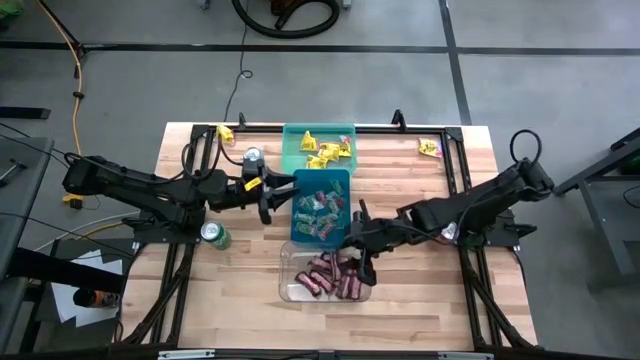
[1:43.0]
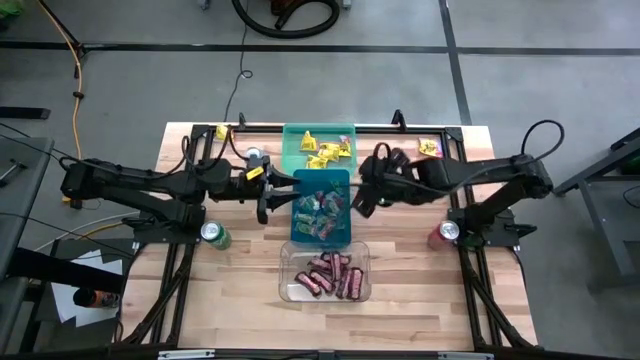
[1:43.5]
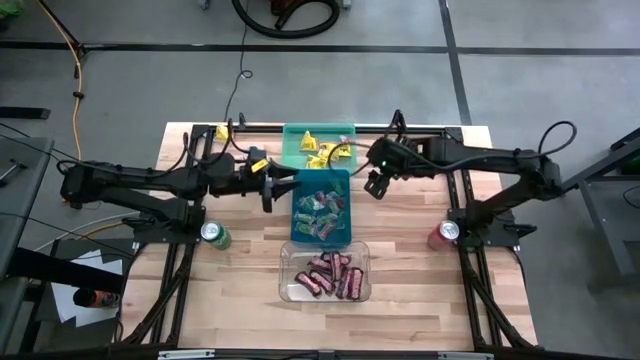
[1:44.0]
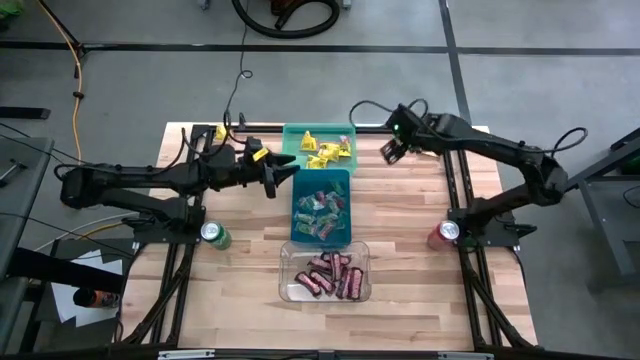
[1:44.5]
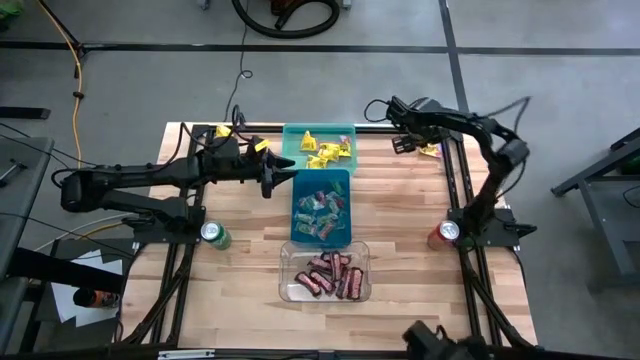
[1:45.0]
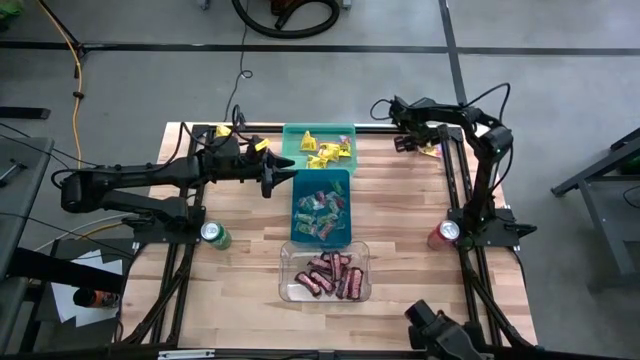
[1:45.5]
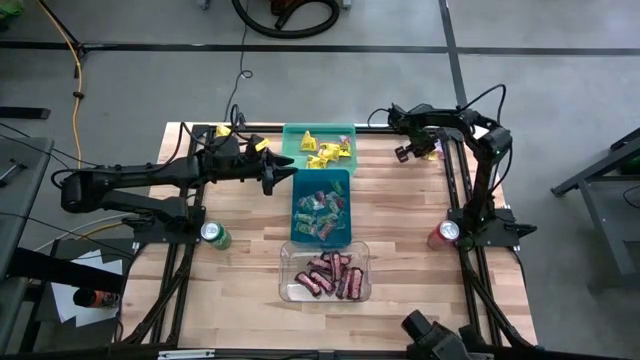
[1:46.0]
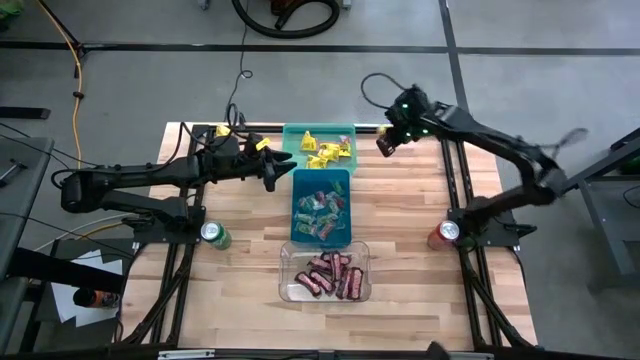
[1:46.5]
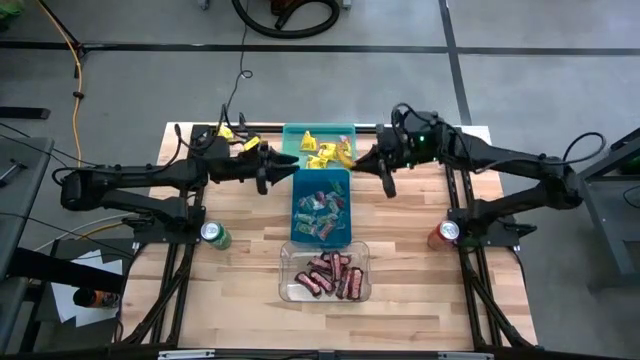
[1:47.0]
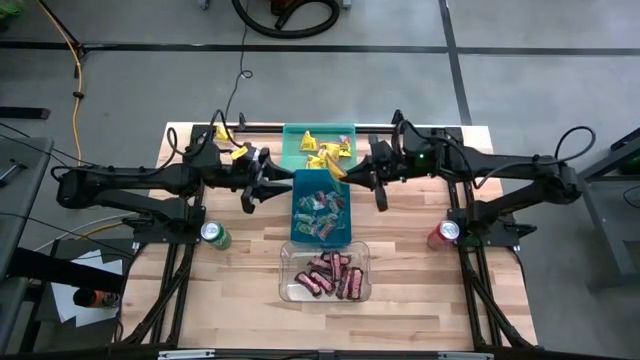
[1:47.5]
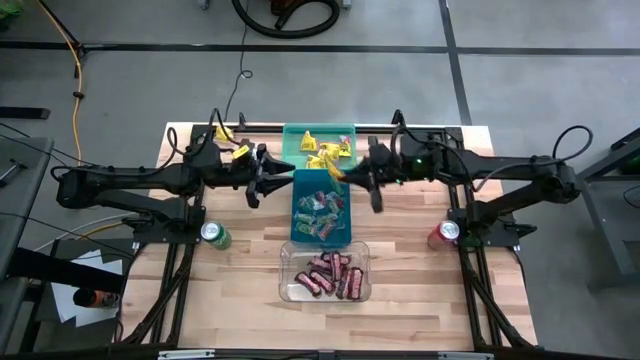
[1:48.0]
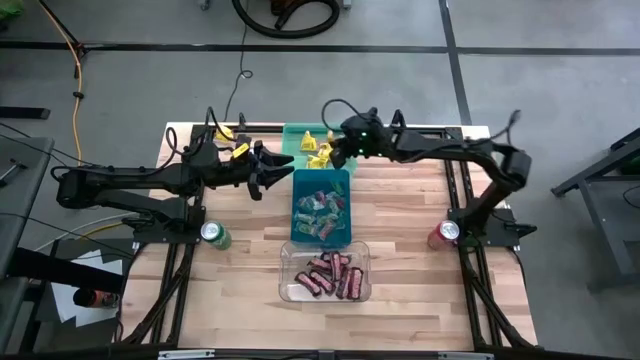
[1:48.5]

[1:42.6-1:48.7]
Task: Sort candy
Put the yellow candy into the light blue bin

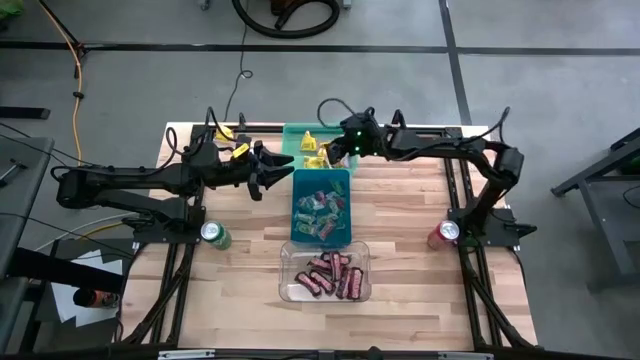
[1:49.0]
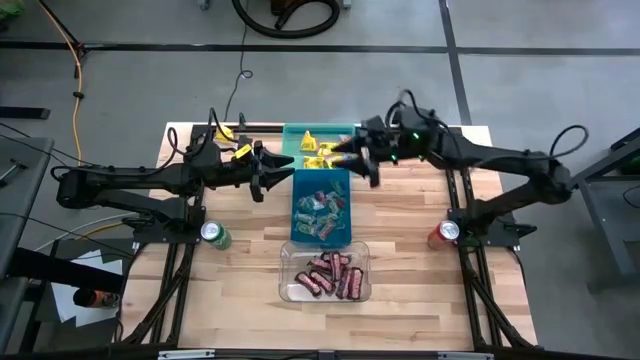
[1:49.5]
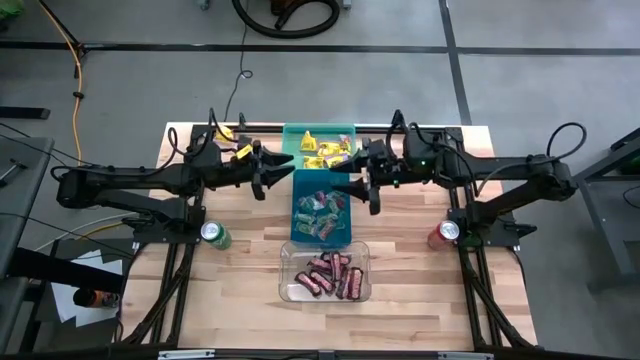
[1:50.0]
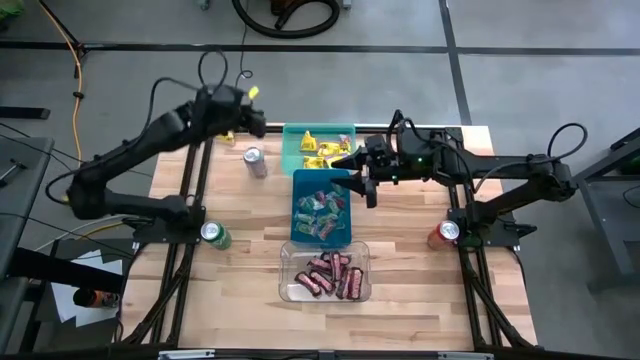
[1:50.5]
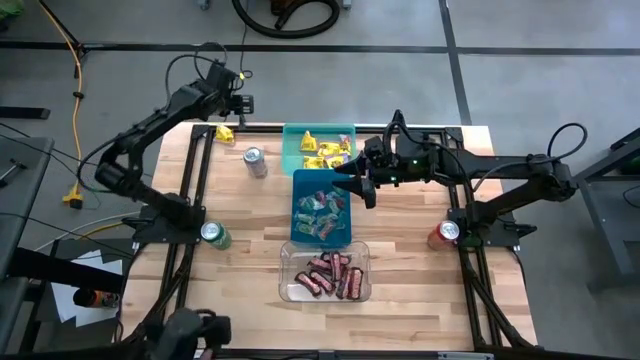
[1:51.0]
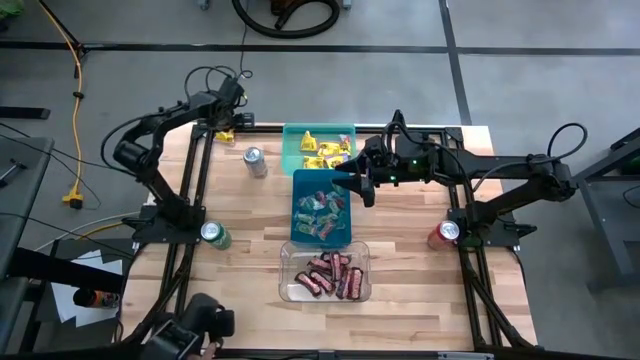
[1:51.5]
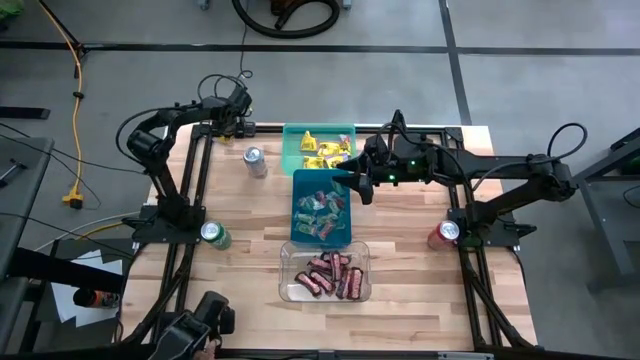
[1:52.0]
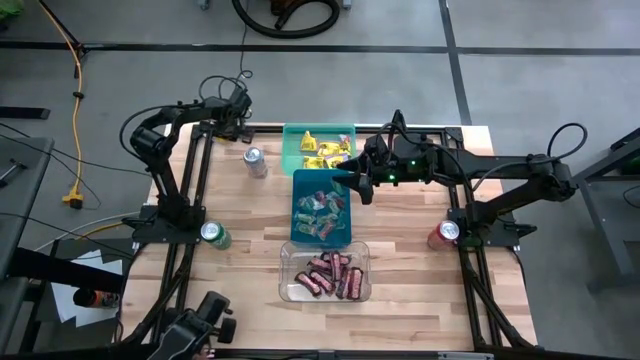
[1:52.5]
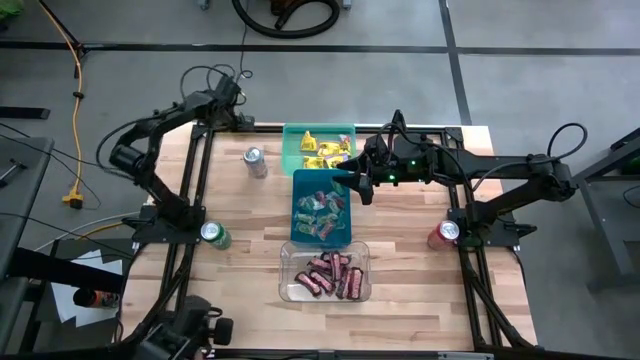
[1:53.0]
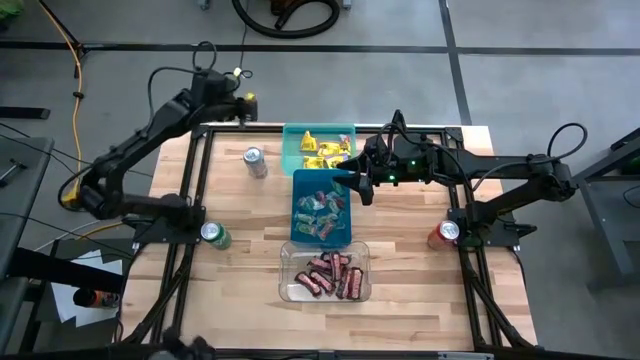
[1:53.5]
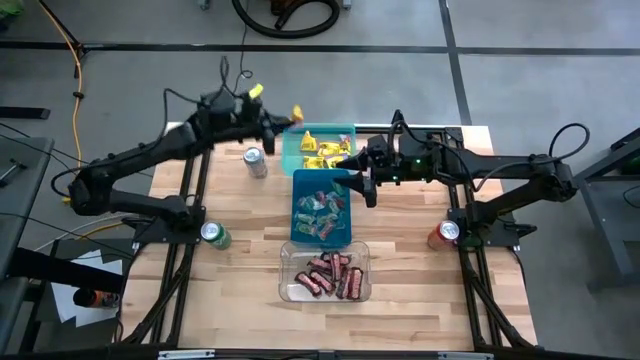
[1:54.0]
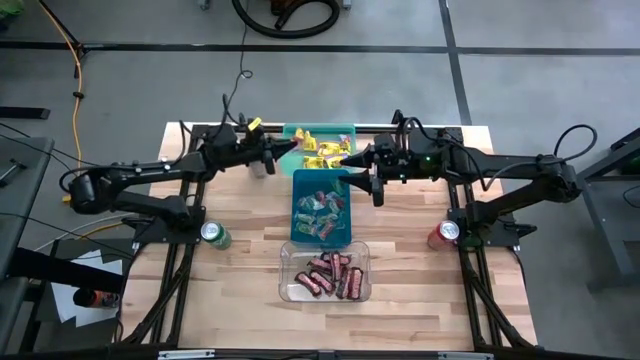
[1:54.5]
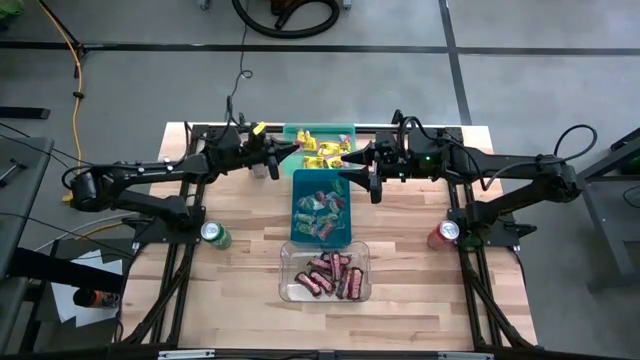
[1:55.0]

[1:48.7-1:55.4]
Put the yellow candy into the light blue bin

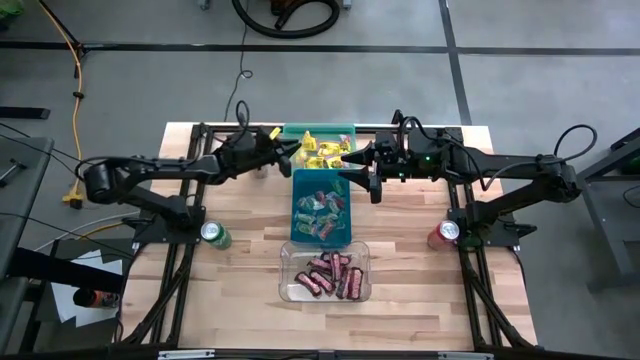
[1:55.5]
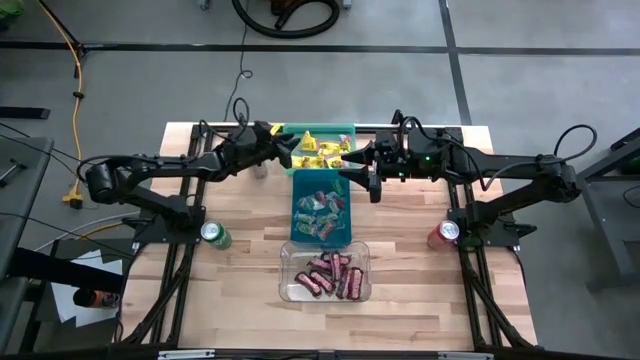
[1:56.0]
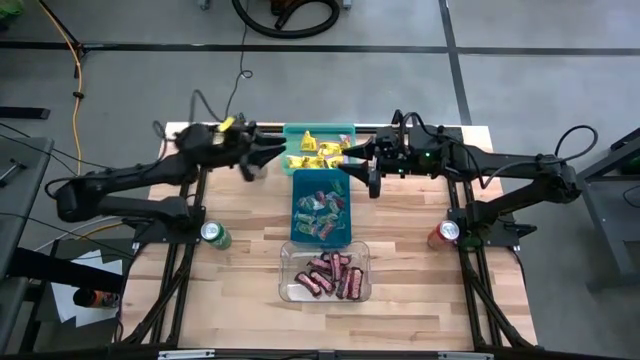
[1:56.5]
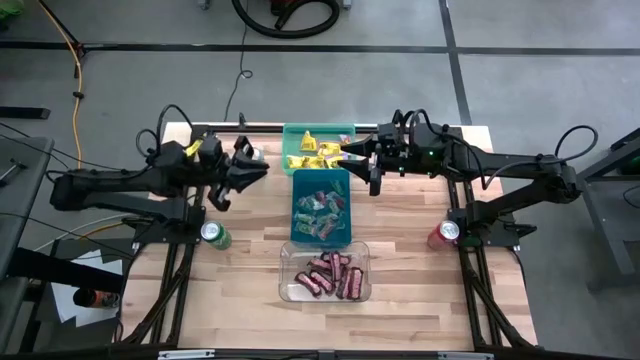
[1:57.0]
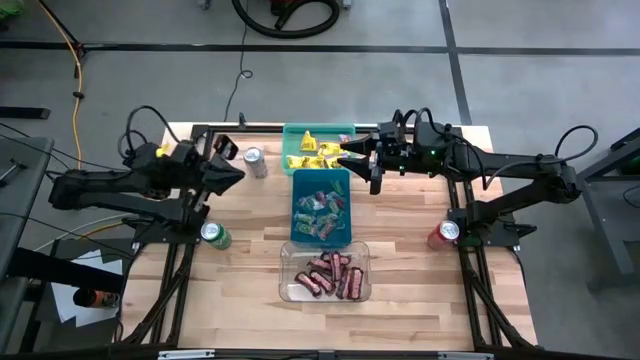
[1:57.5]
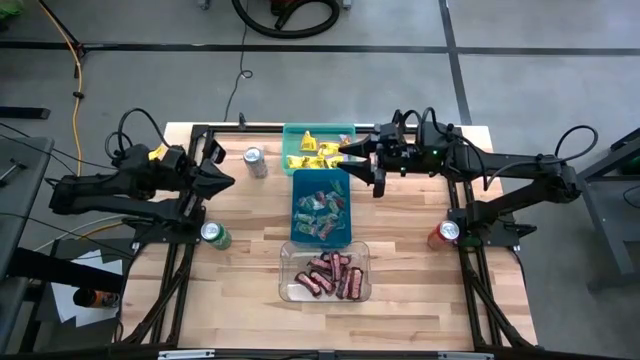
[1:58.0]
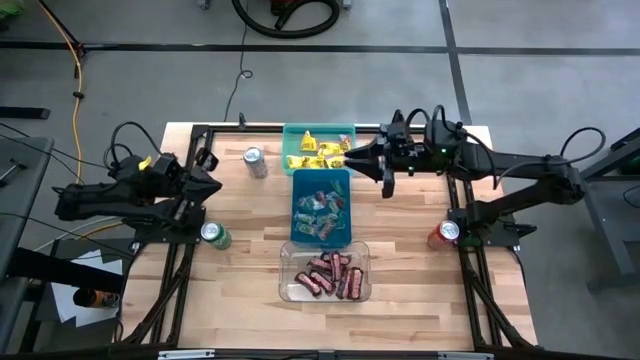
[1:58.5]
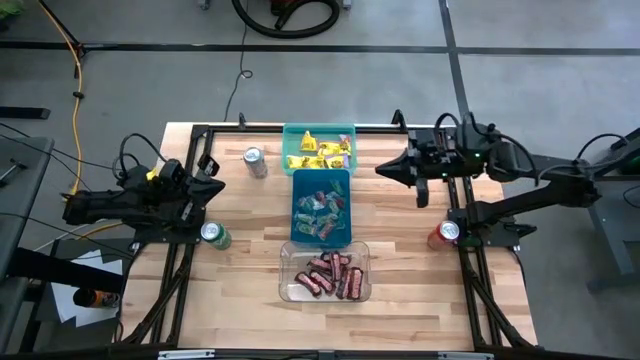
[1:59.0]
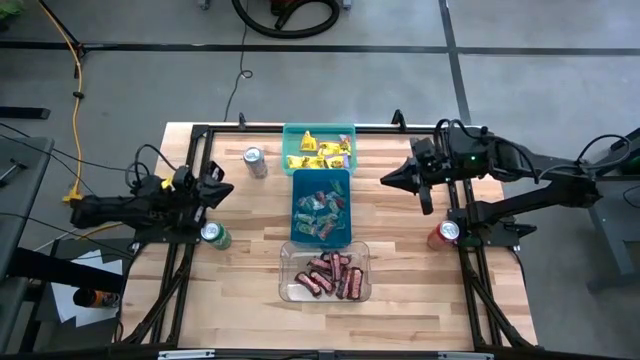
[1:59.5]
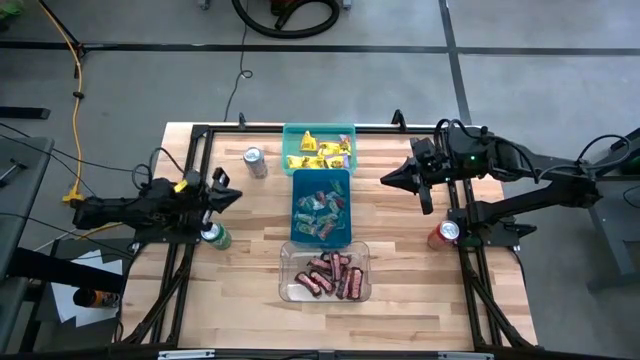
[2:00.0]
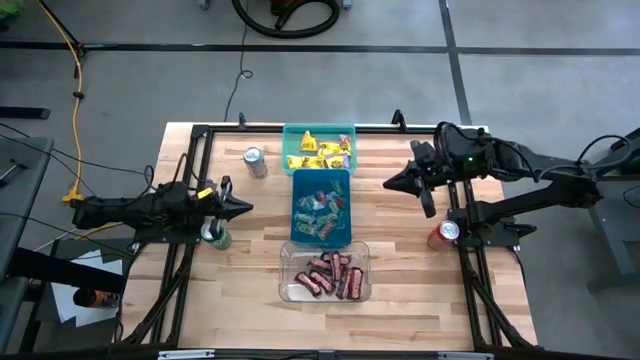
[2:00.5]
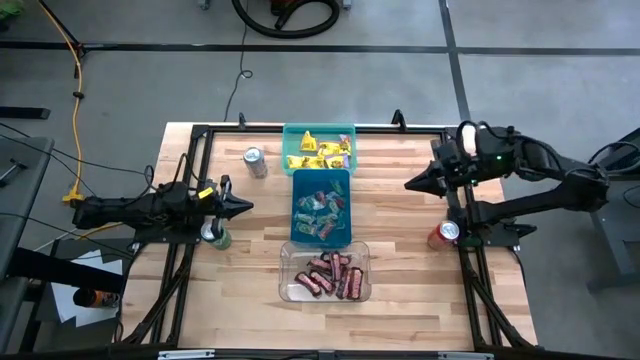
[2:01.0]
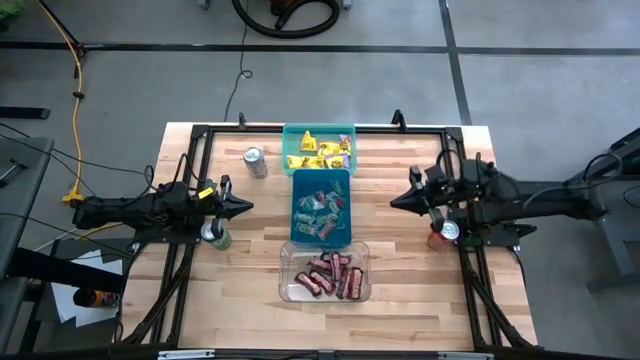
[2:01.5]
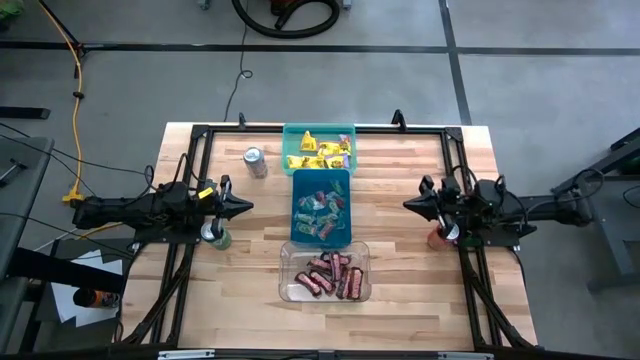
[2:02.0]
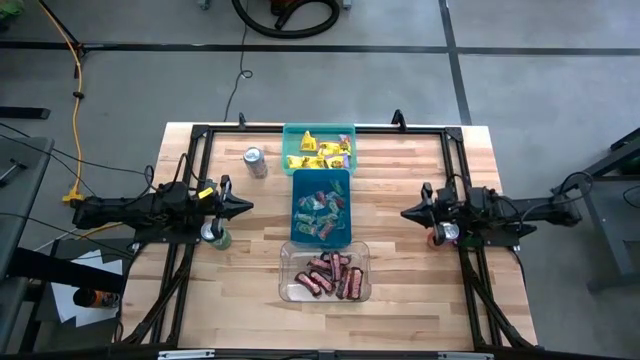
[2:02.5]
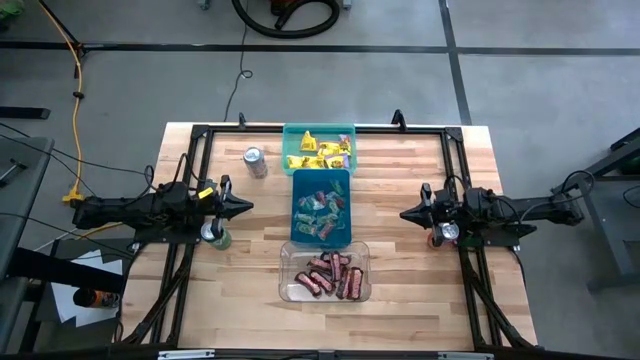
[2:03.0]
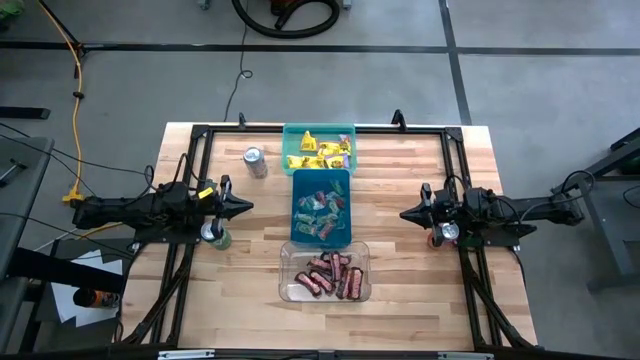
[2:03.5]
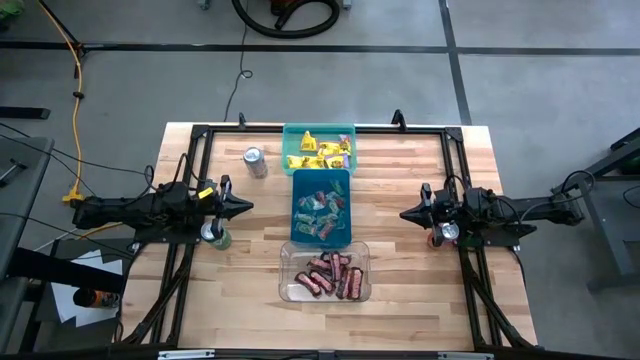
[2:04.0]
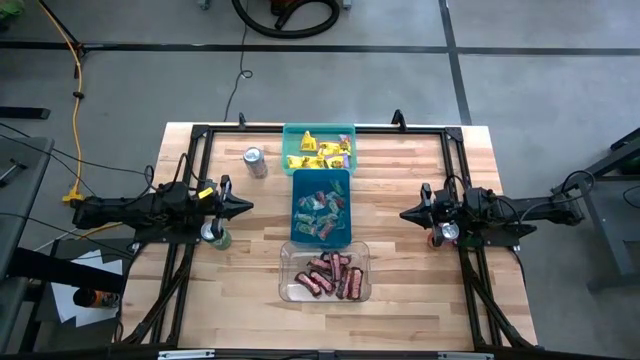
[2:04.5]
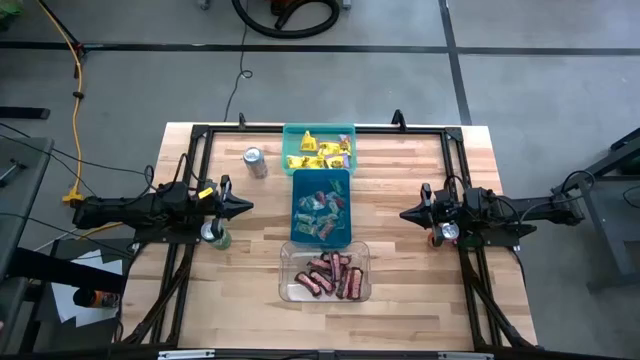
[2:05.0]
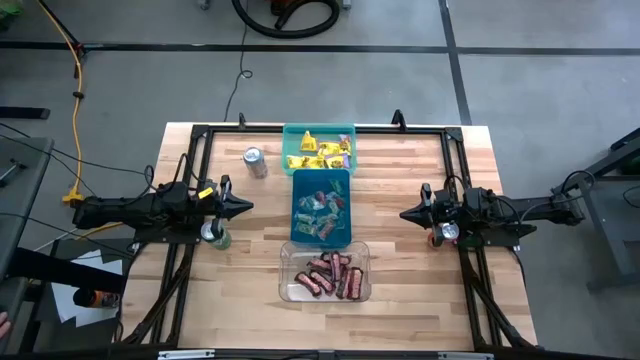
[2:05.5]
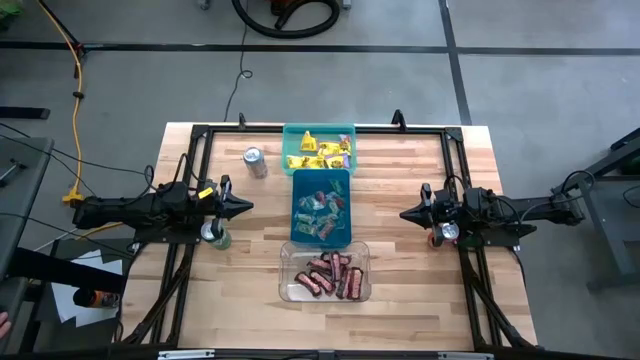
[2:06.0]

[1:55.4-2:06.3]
Return to Home Position
